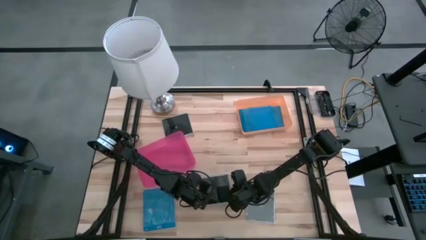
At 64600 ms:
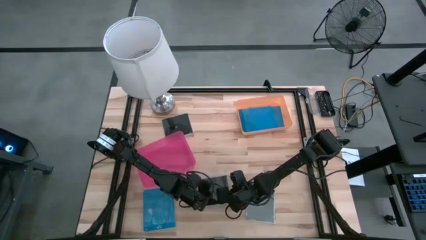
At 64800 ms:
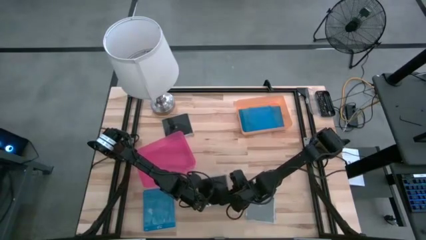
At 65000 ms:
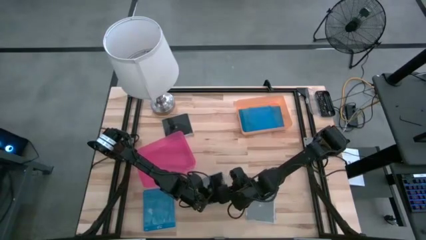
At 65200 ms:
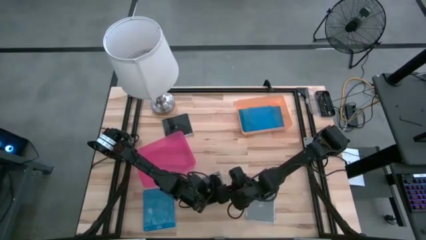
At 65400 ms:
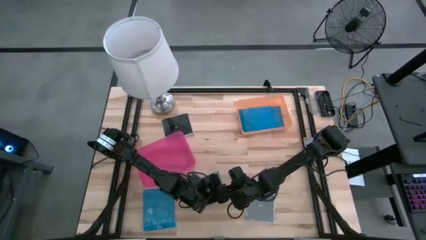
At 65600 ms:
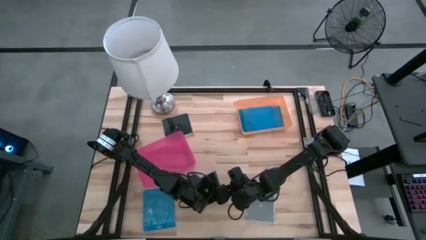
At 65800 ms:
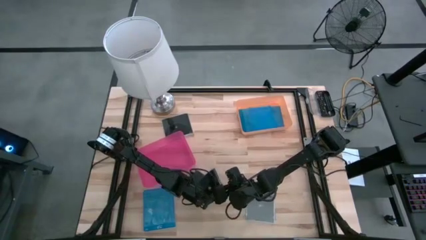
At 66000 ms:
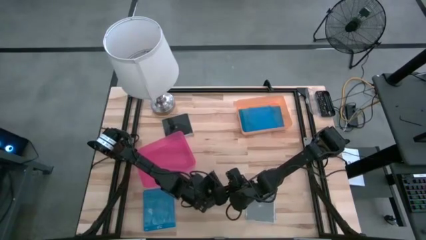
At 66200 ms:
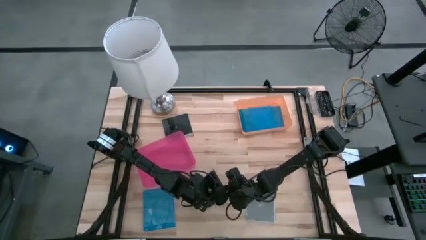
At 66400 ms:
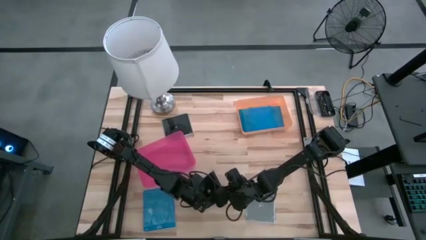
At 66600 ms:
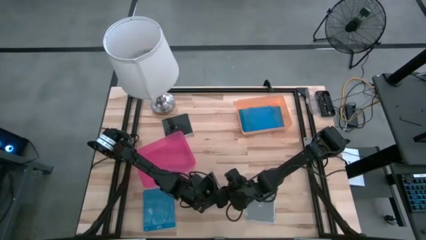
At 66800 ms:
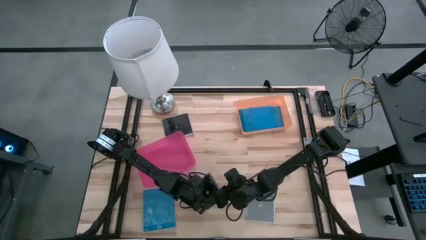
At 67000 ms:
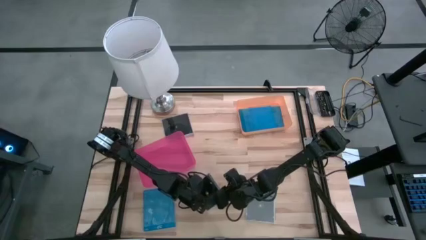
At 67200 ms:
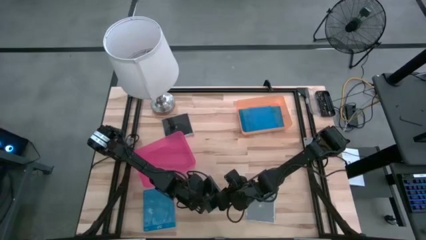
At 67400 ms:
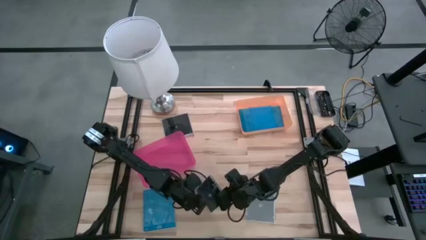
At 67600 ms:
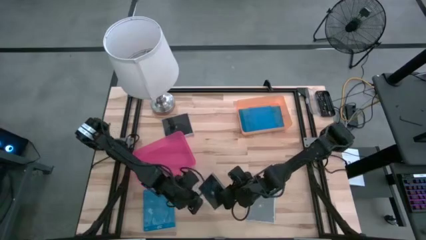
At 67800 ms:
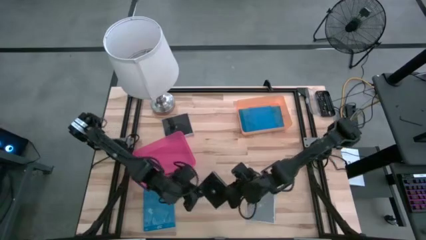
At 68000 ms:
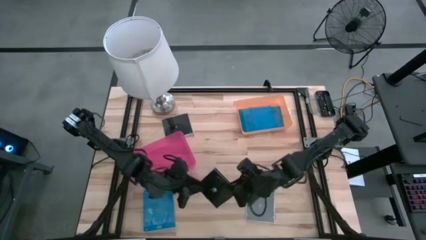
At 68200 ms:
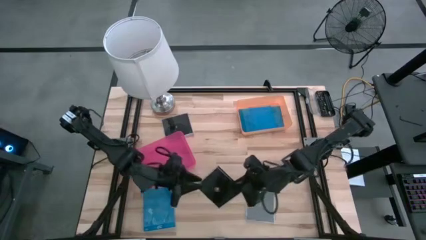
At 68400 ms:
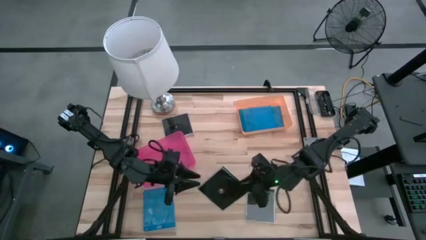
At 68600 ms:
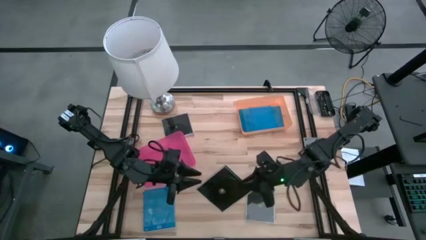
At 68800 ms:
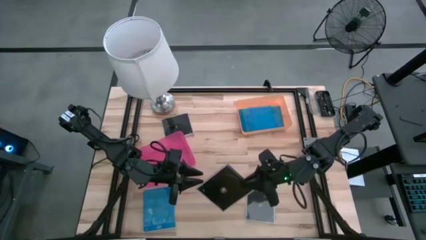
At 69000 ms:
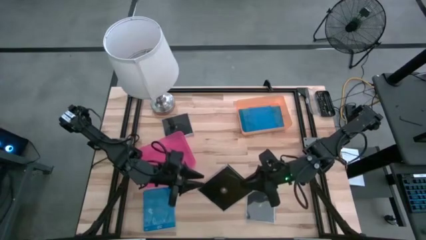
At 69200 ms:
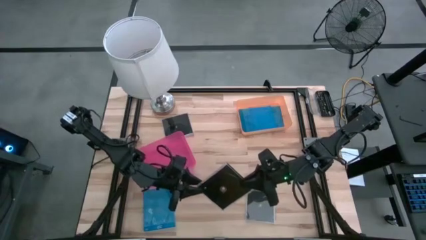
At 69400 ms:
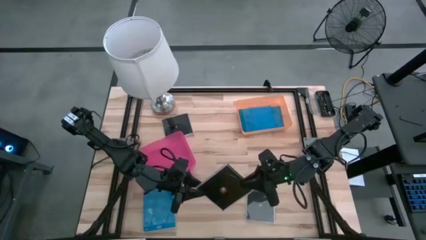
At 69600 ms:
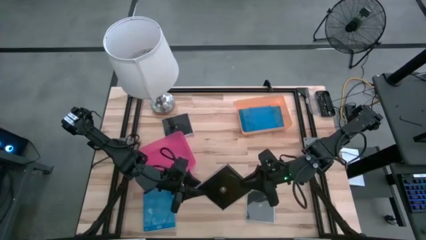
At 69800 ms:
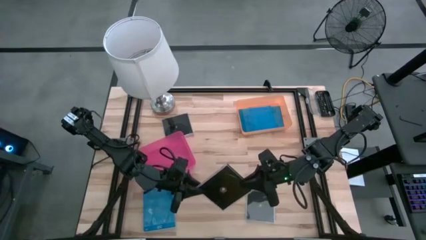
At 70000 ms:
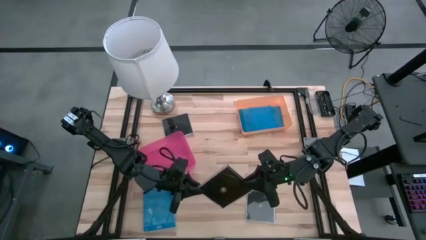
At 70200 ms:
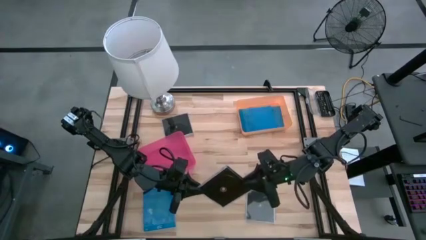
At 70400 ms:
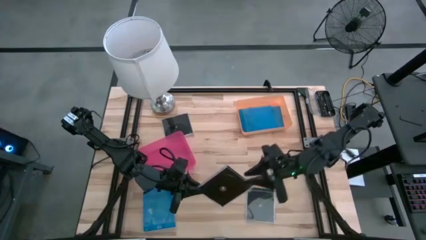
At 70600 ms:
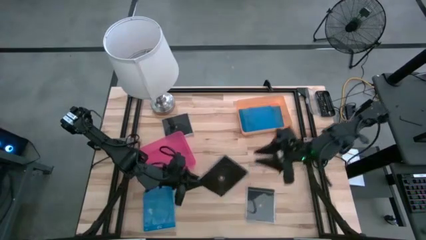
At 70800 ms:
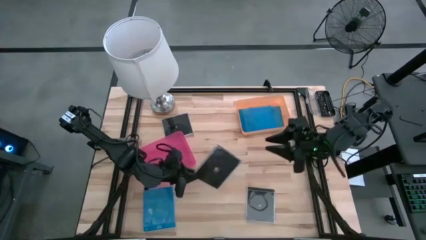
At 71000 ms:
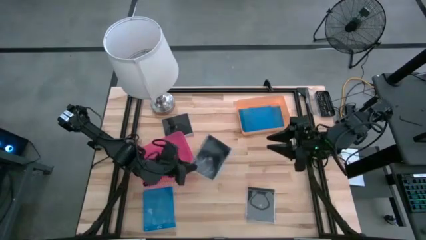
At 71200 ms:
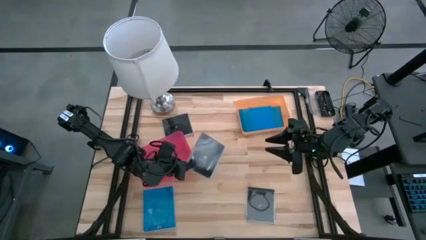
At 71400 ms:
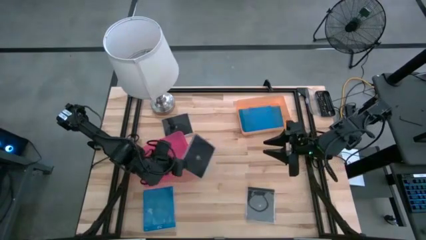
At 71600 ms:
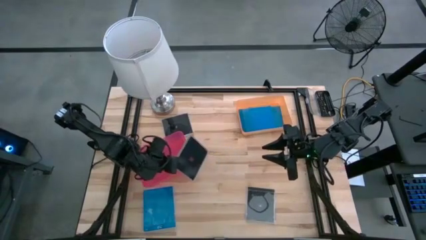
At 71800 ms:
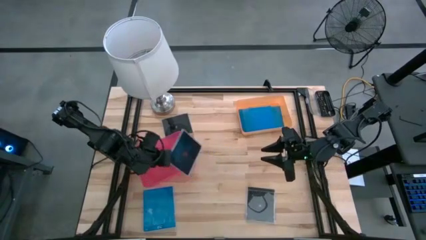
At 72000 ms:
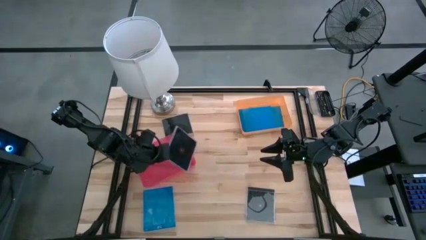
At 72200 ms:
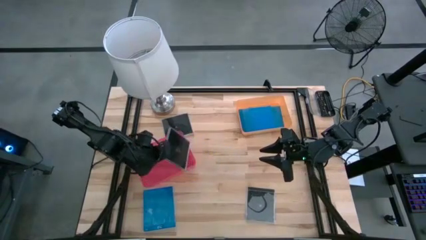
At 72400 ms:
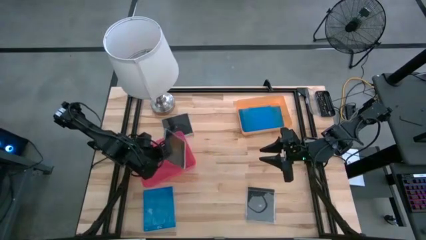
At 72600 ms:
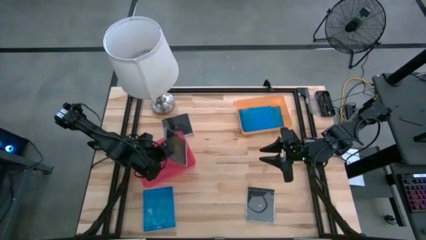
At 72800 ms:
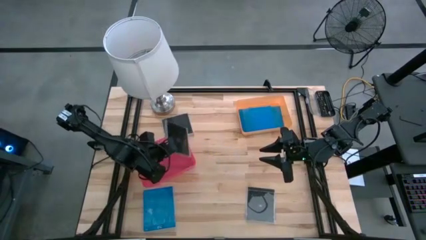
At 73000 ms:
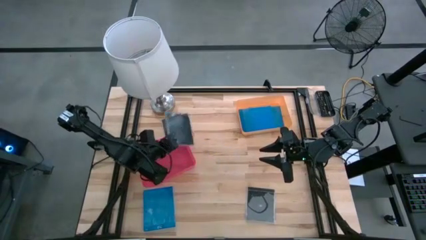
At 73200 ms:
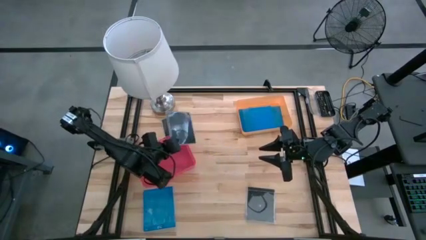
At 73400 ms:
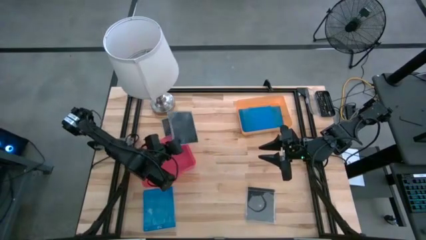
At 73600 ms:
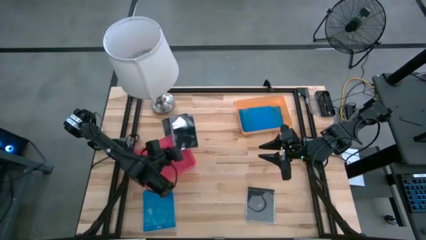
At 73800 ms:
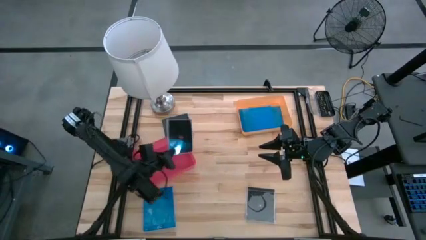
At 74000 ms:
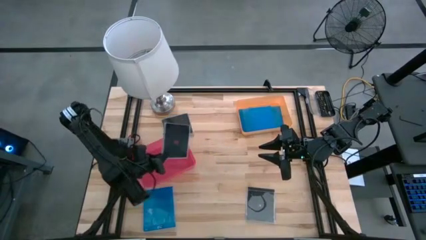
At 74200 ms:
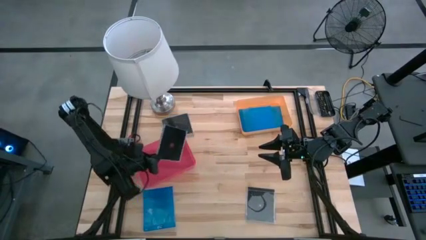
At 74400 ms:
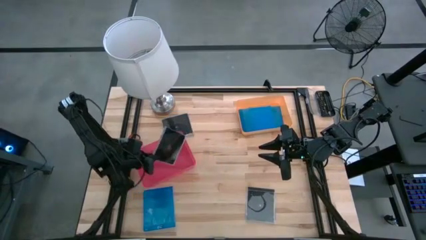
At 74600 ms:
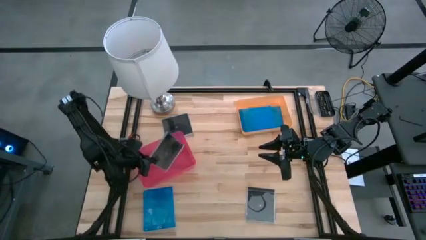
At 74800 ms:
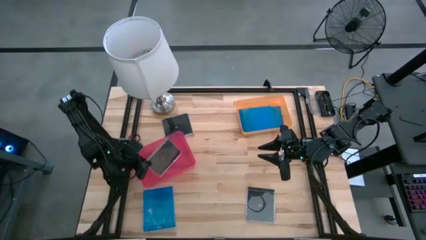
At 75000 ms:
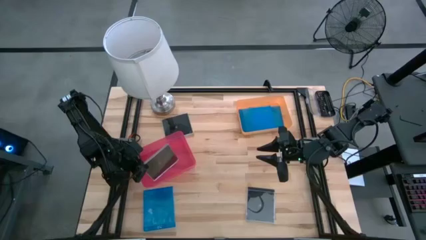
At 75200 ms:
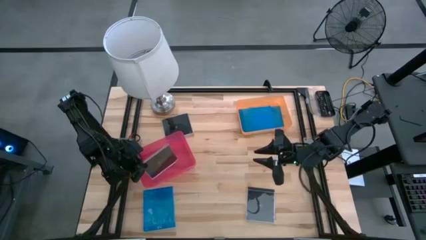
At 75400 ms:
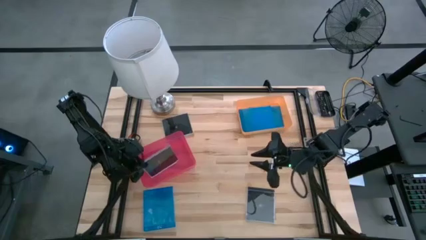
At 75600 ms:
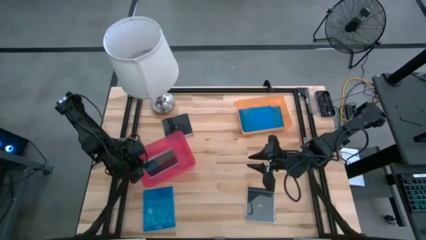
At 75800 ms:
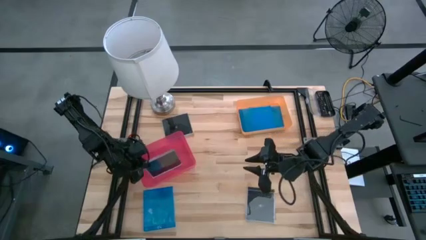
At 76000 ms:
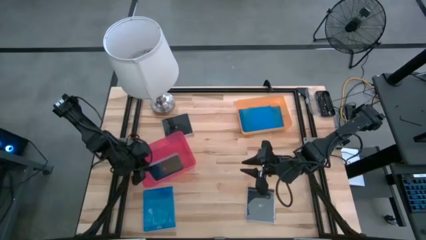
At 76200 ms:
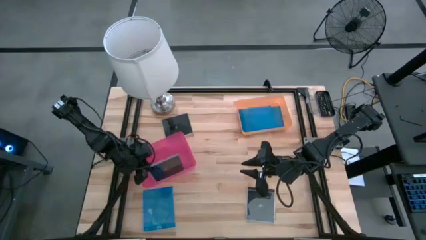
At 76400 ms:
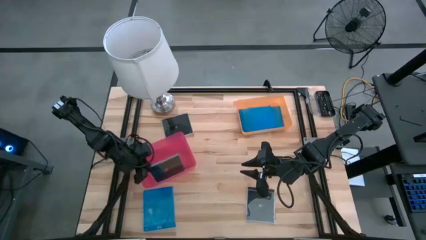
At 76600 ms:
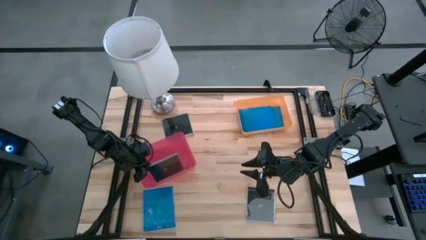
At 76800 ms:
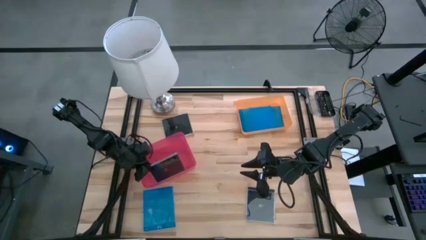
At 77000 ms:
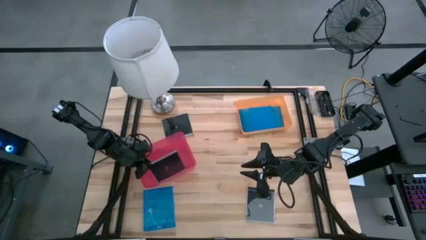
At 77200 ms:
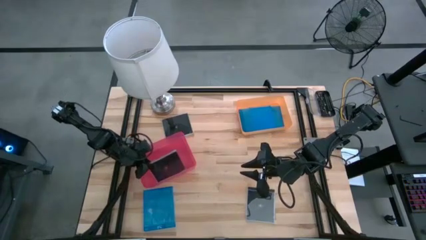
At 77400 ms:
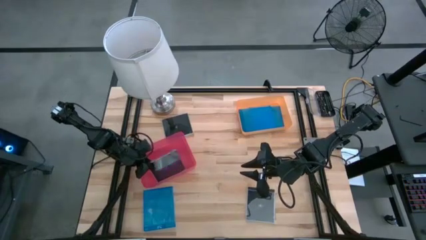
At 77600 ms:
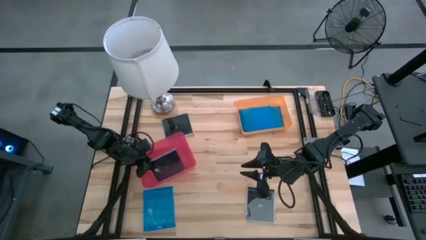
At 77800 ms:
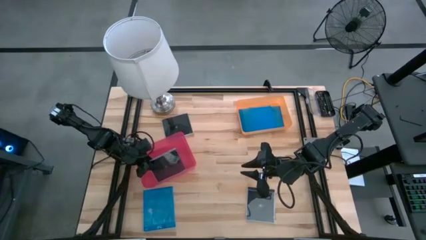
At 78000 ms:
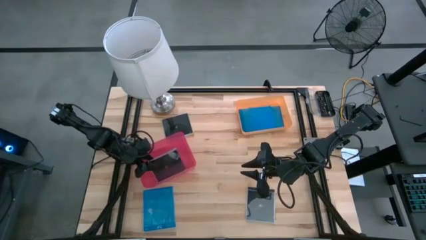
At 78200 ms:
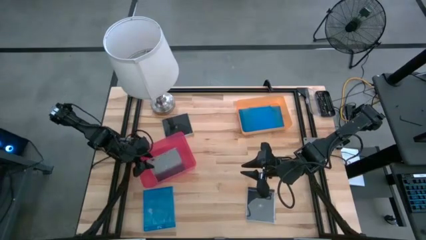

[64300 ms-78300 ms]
Task: Pick & place jewel cases by type
Put the bottom left black CD case into the pink bin
